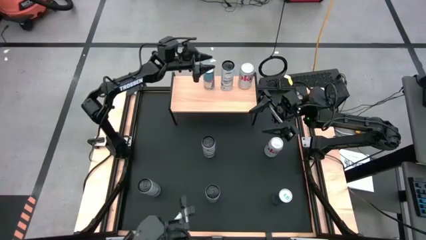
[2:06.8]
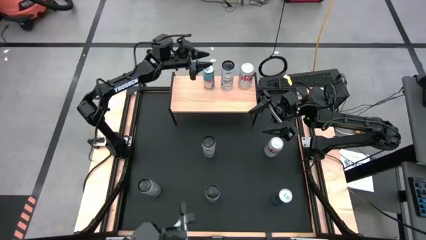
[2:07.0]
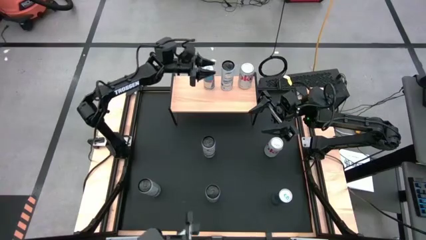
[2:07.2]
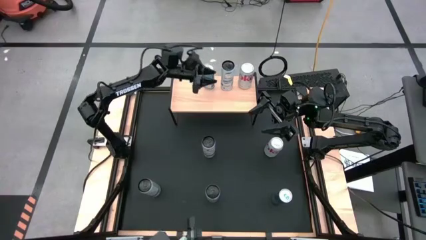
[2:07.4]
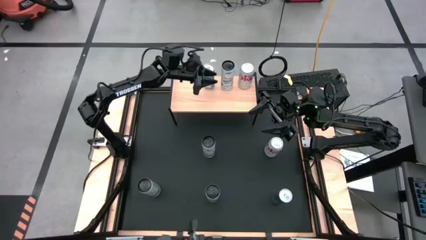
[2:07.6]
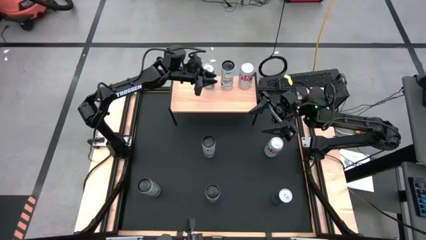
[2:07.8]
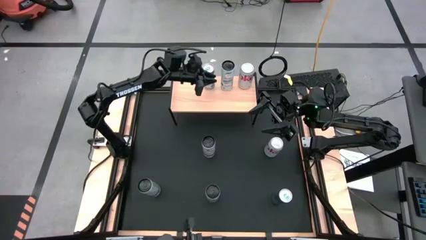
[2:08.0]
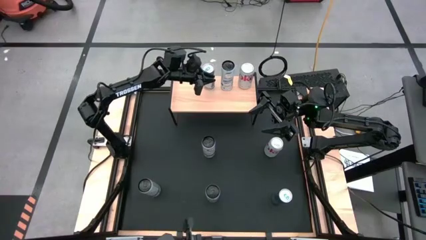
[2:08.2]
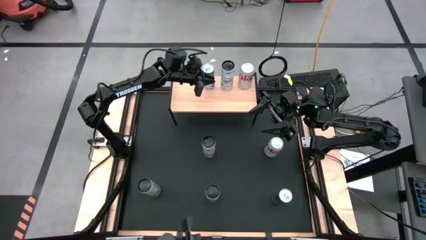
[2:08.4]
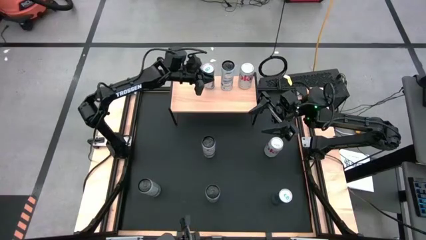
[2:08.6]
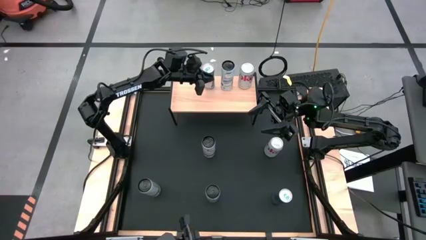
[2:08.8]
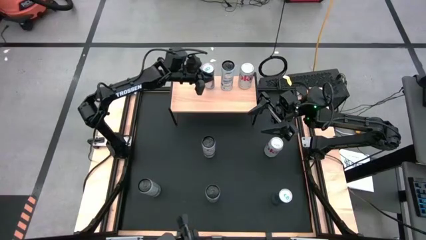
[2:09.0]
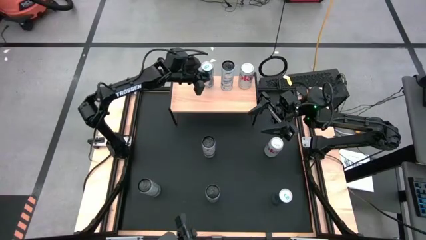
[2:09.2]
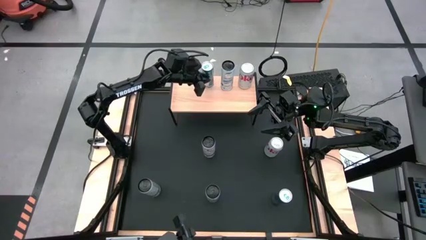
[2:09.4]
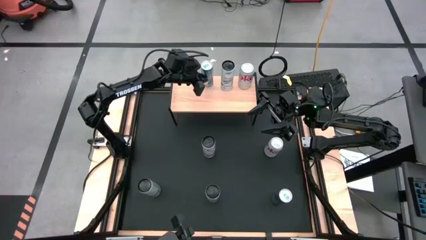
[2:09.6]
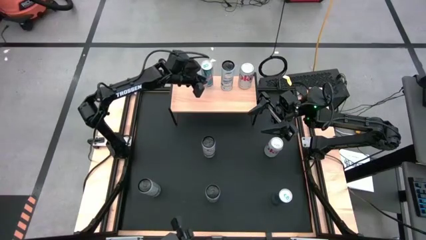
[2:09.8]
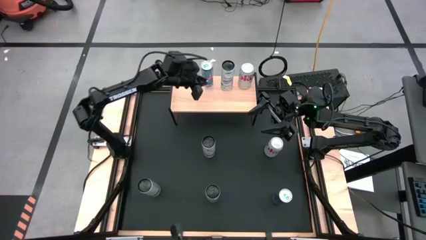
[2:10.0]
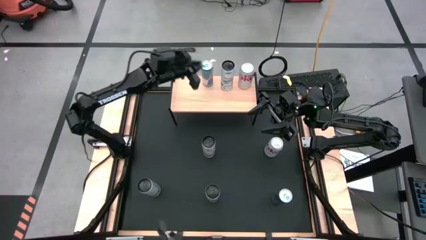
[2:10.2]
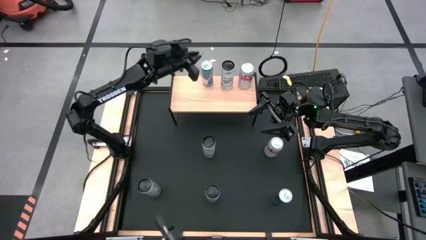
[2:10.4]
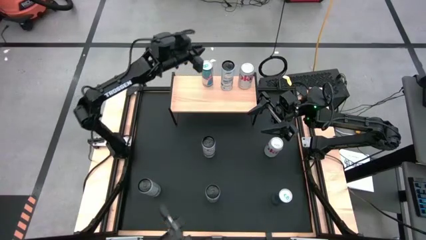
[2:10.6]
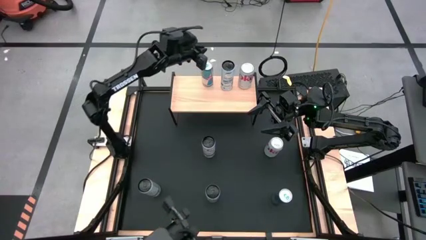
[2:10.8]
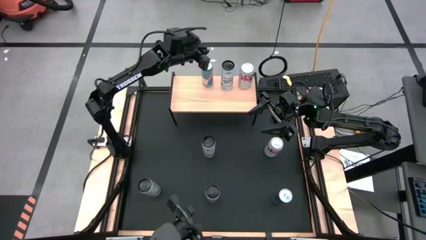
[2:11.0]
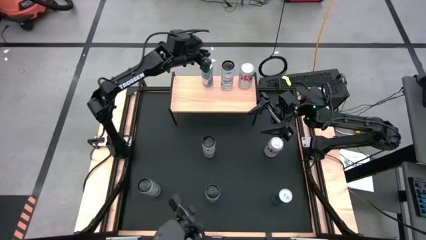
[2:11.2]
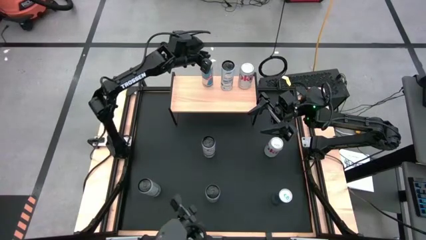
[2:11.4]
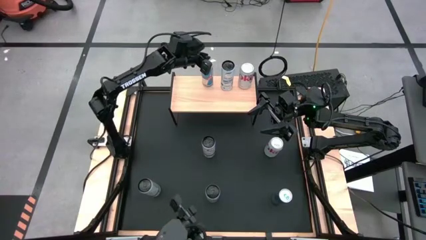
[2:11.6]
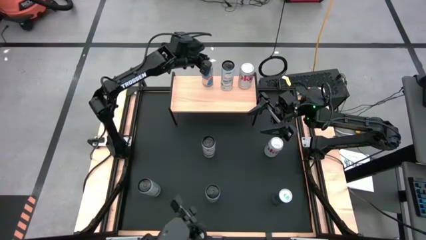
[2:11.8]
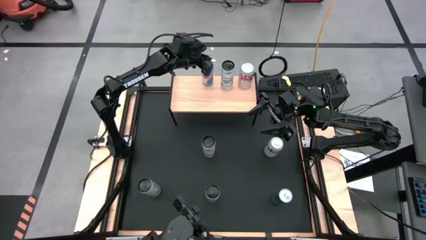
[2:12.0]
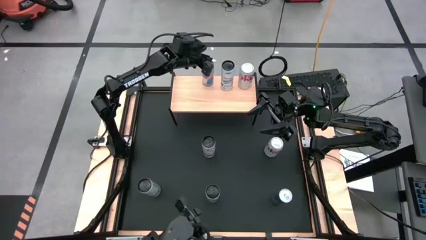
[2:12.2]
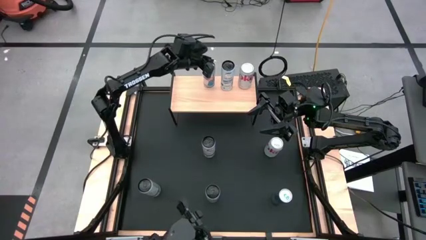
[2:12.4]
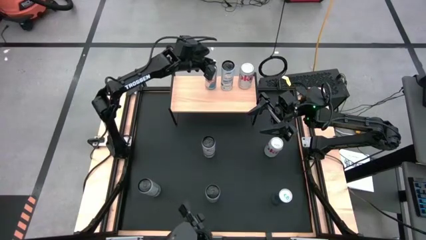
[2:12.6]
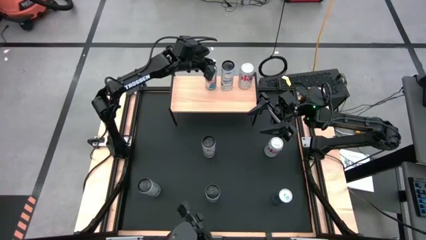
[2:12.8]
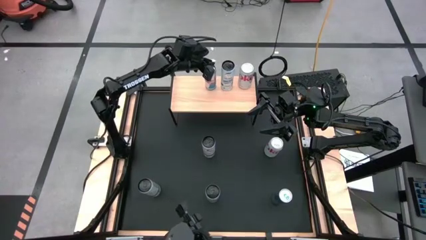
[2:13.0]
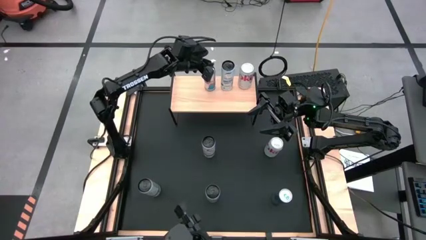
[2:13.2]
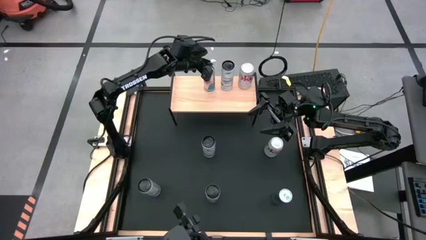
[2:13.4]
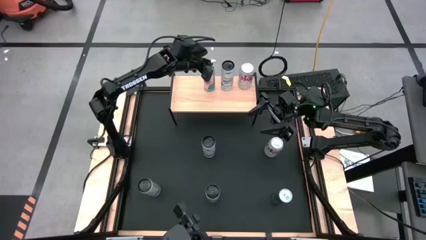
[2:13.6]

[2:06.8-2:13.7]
Task: Place canned beverage on shelf
Adjust the blue soda can

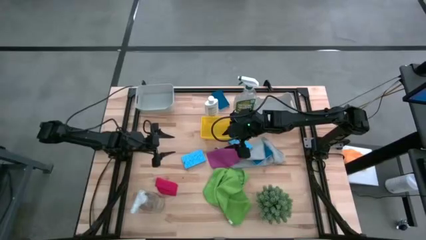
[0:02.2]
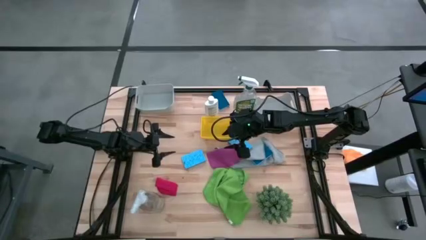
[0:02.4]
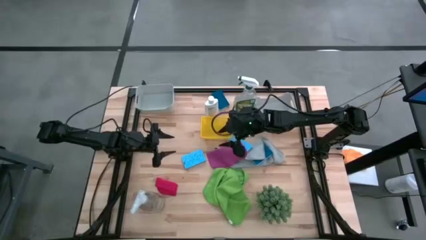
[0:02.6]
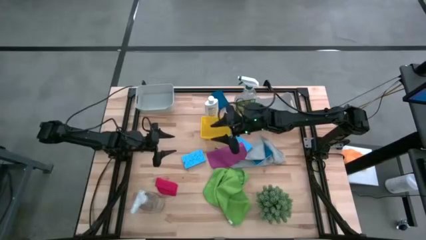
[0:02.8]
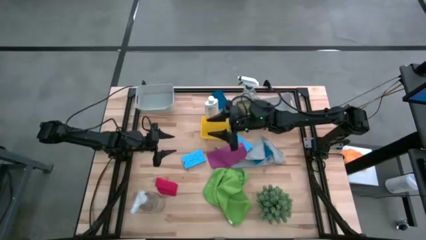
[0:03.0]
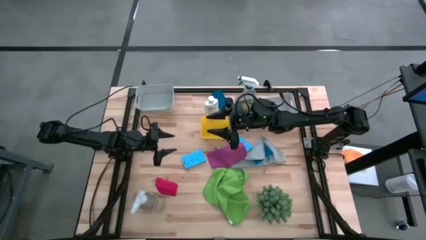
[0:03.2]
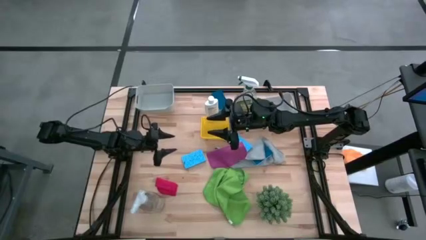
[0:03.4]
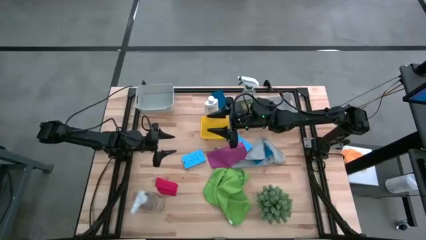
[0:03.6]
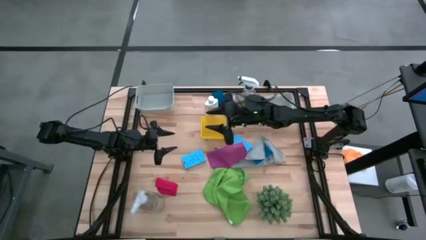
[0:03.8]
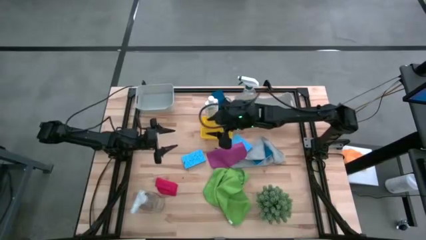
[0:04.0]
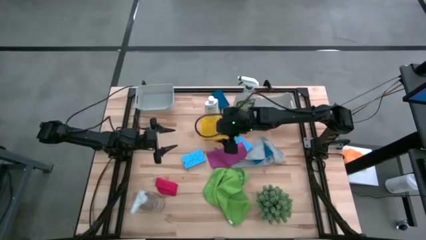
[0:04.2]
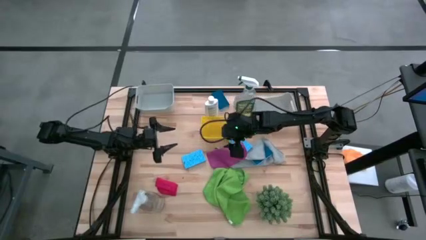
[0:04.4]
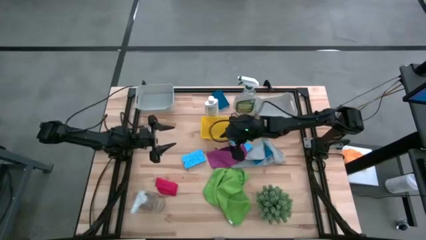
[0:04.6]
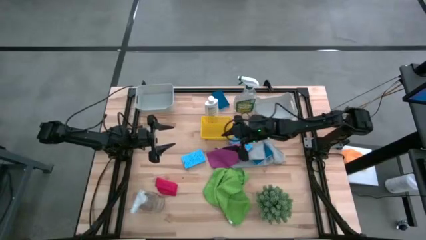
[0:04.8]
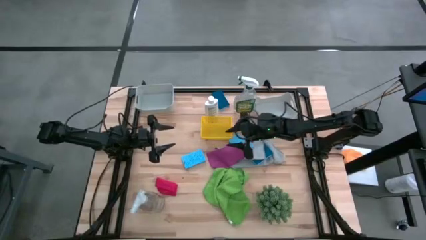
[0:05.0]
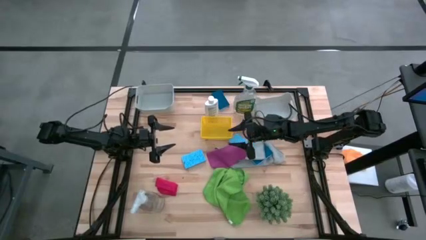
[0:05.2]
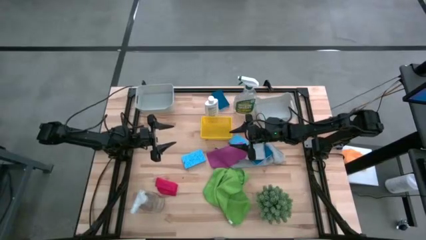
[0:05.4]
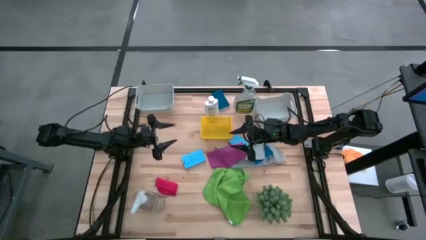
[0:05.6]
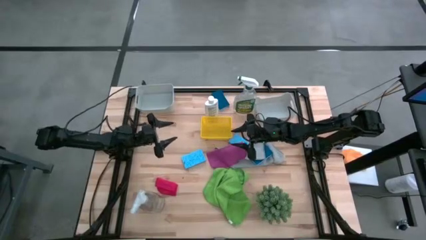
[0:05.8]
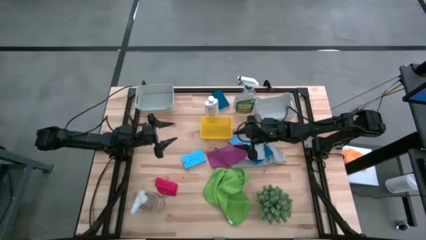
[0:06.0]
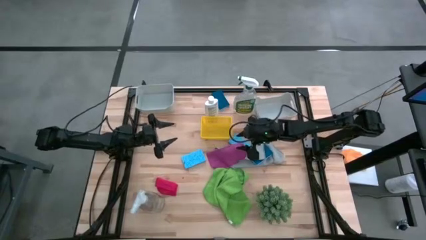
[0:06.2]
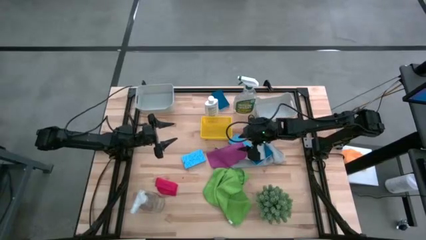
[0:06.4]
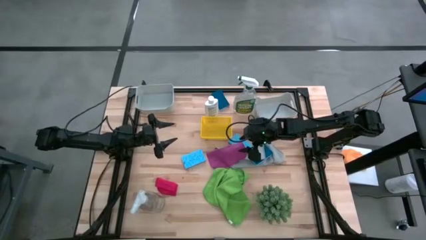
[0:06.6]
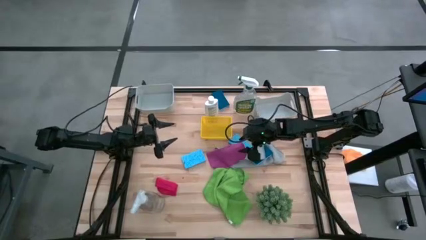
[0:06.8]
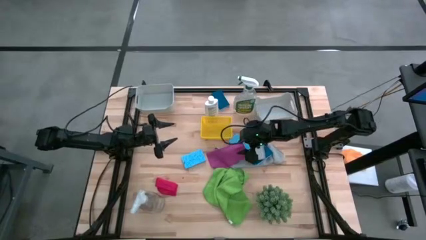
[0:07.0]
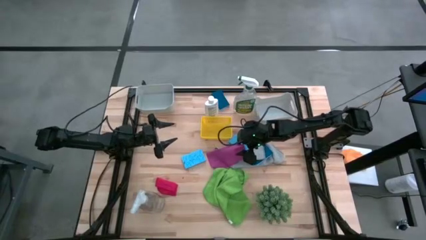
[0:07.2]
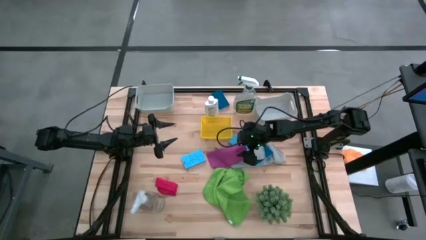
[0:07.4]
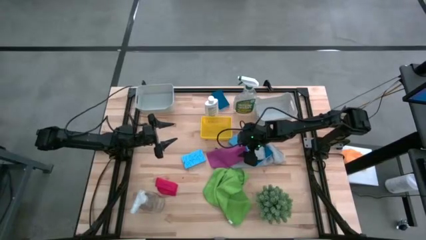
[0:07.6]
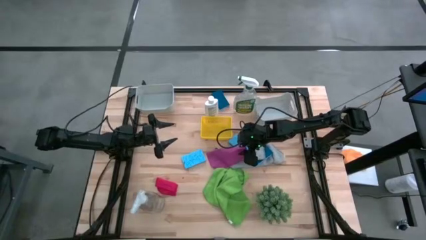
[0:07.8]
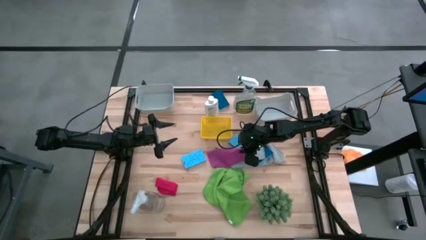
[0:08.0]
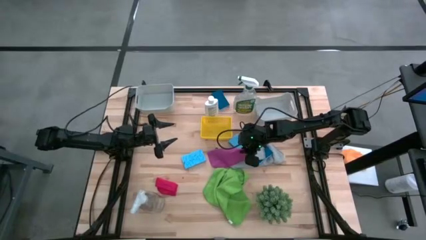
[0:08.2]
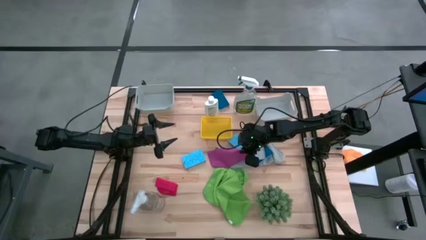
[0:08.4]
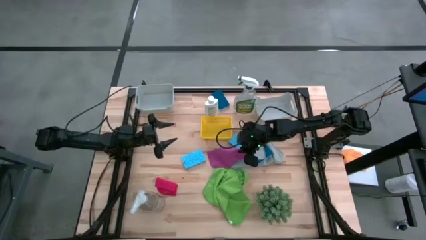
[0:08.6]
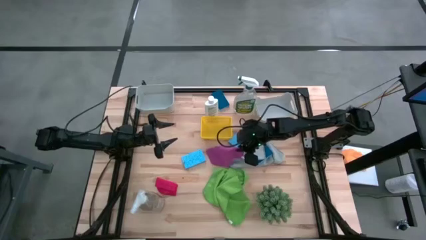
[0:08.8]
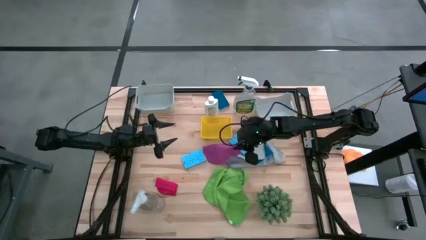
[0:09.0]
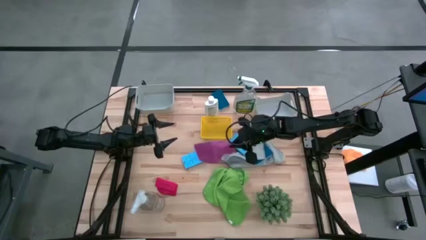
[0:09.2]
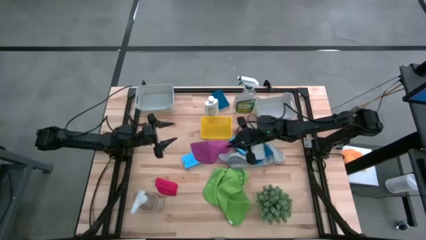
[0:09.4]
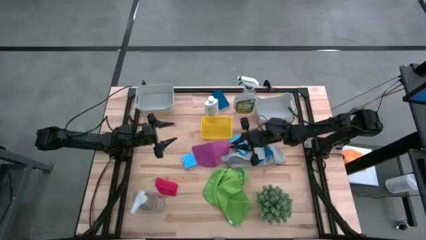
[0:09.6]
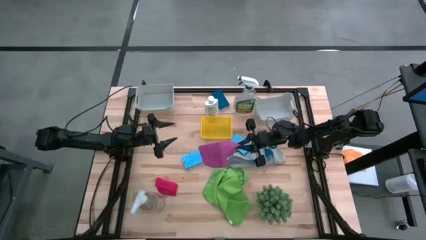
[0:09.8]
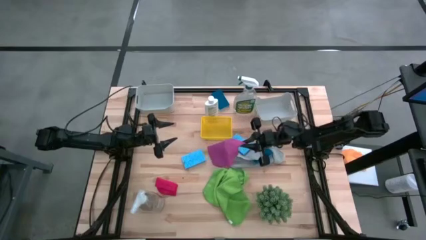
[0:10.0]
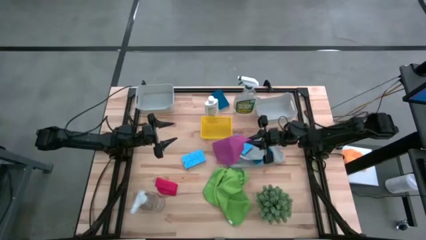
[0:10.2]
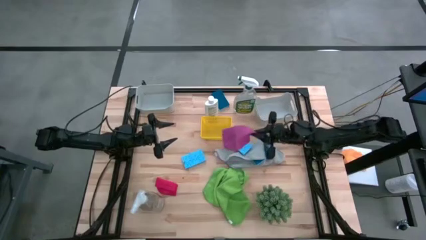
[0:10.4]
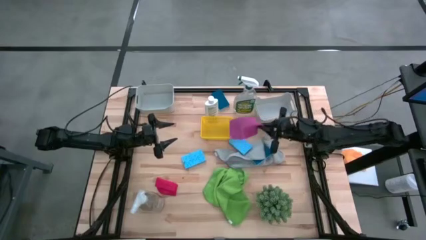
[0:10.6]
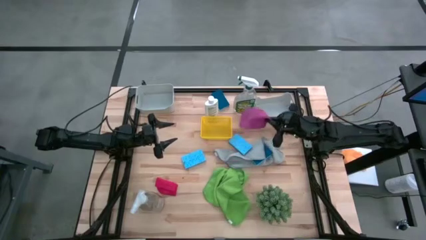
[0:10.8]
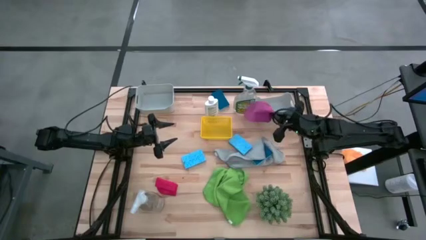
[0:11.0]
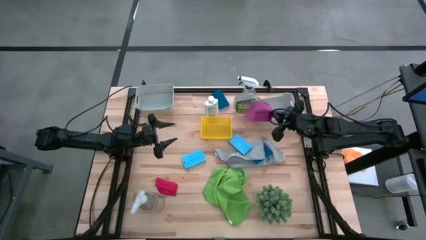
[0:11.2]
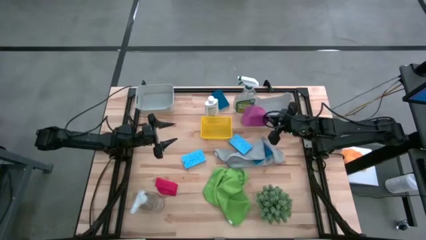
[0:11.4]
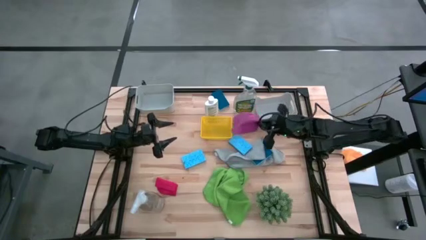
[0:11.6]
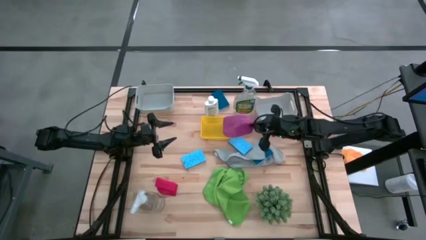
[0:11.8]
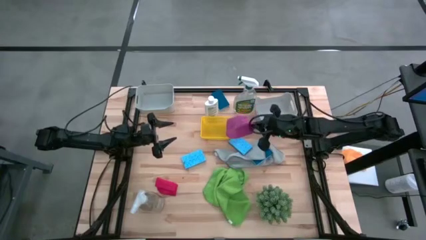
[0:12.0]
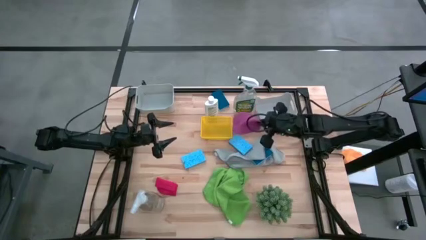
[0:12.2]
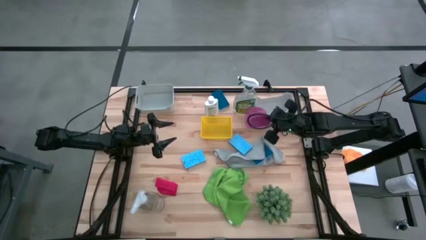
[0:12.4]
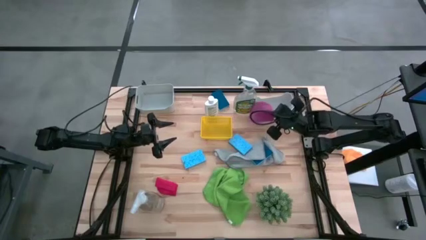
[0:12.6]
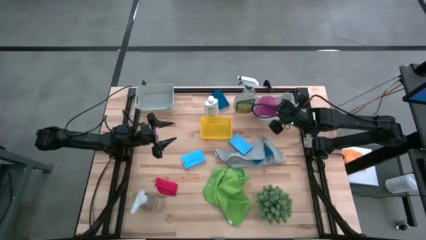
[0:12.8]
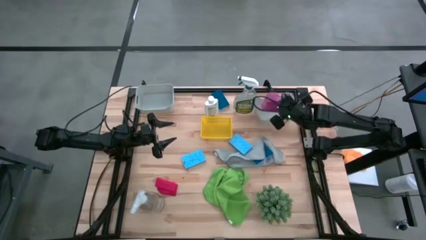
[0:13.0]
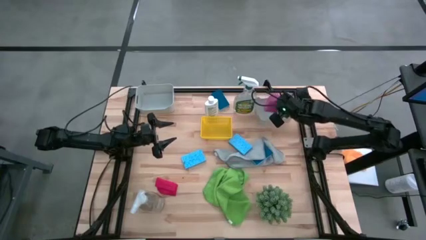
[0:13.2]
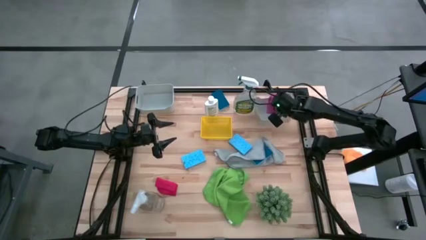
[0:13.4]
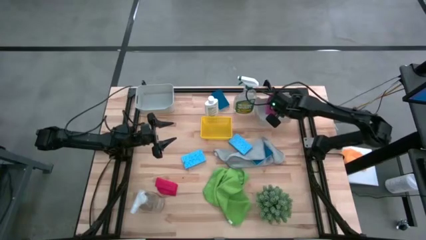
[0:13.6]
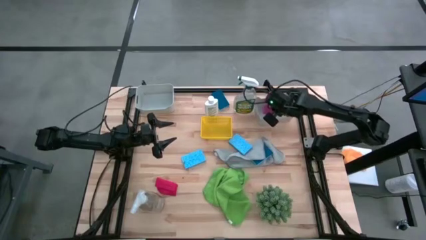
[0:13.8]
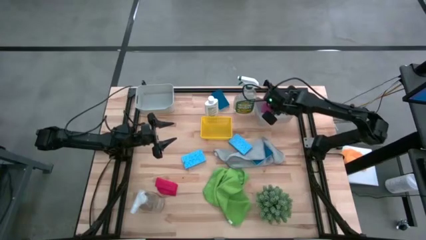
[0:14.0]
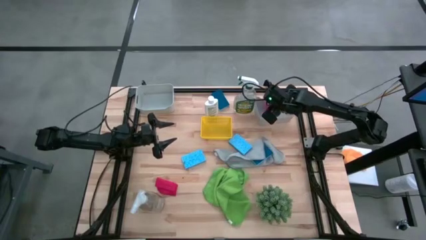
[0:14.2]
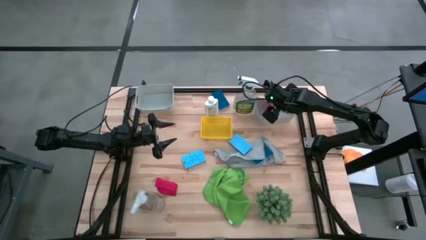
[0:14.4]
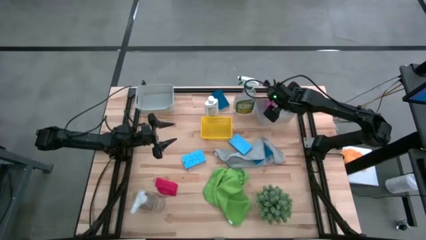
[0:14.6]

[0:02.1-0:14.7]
Task: Pick & Place Kitchen Items
Put the purple microfiber towel into the right gray bin
